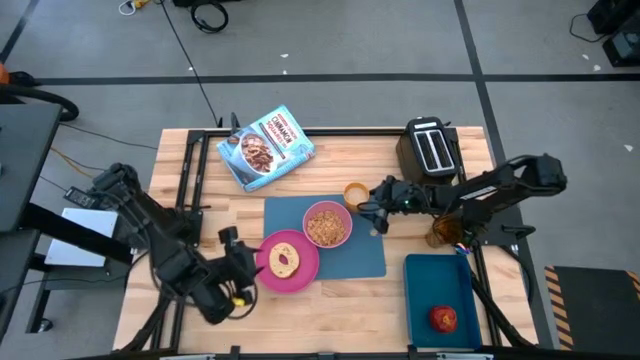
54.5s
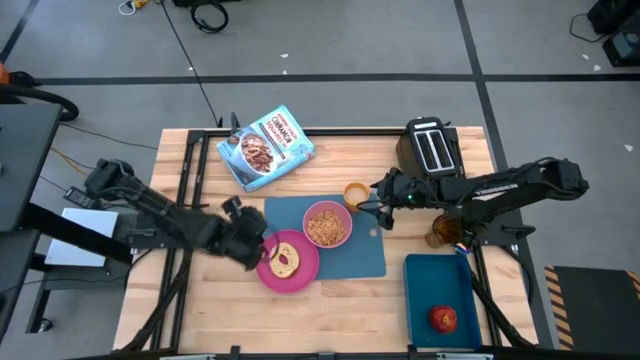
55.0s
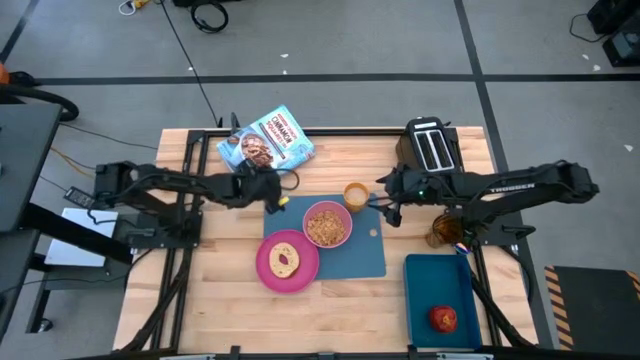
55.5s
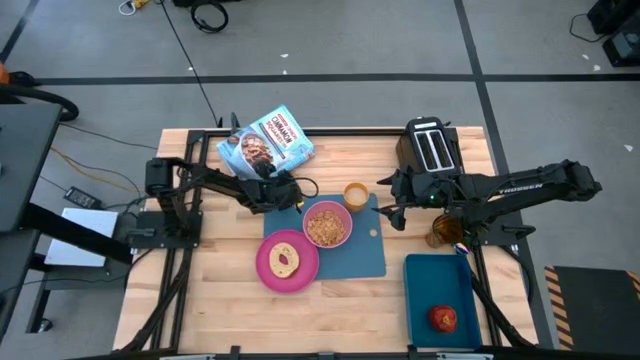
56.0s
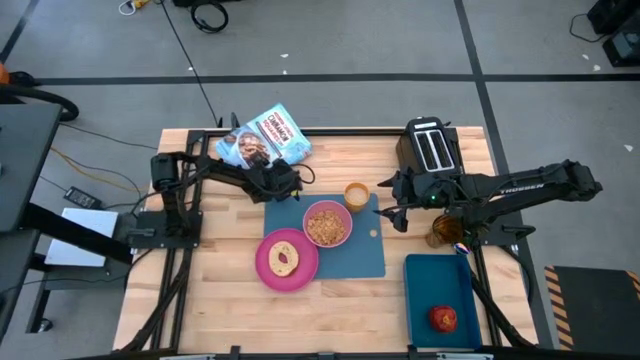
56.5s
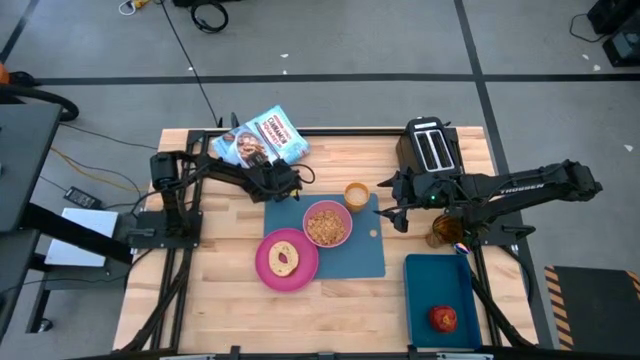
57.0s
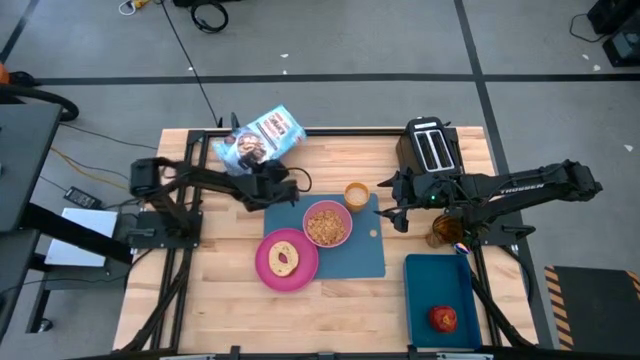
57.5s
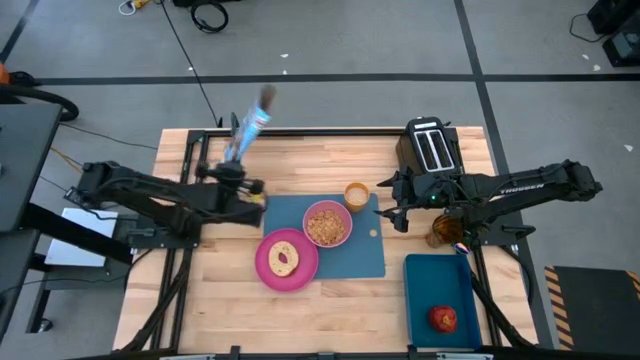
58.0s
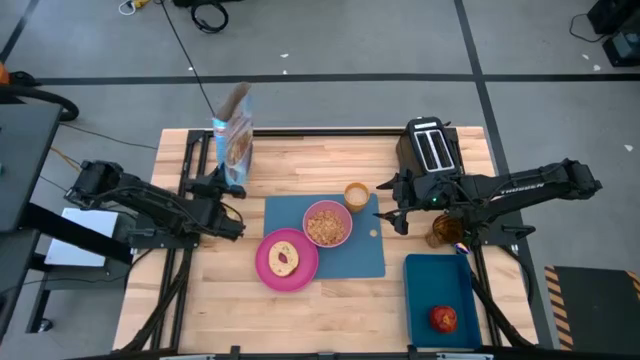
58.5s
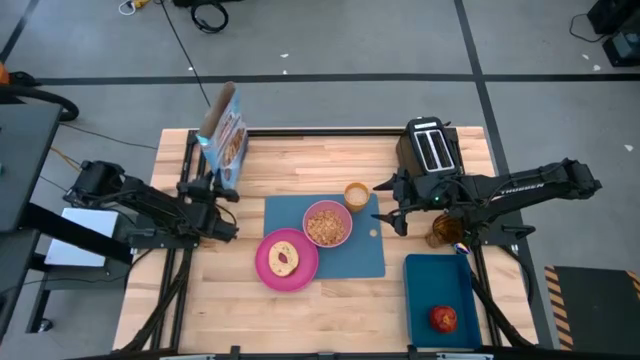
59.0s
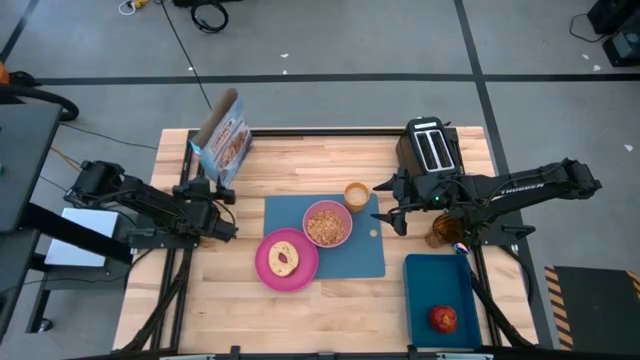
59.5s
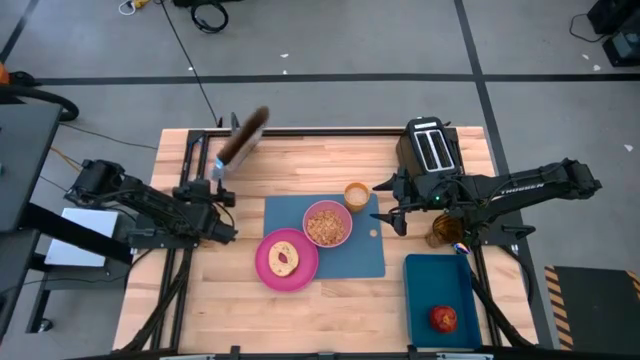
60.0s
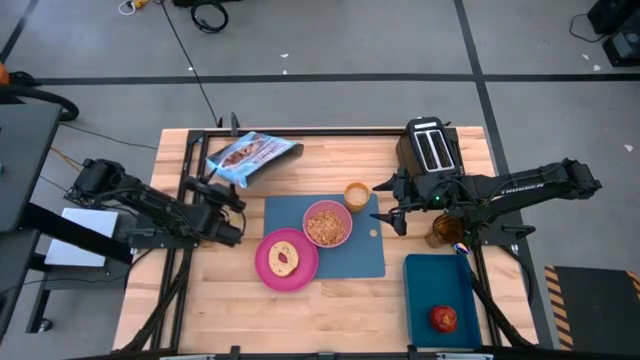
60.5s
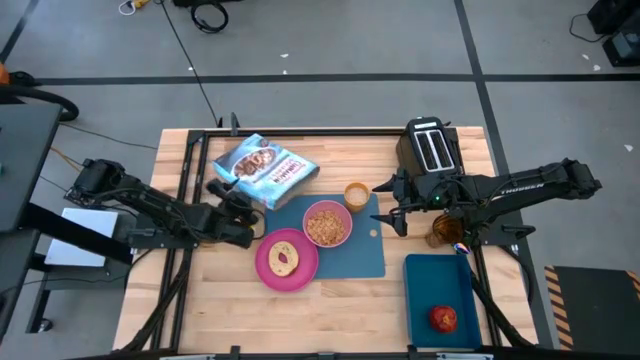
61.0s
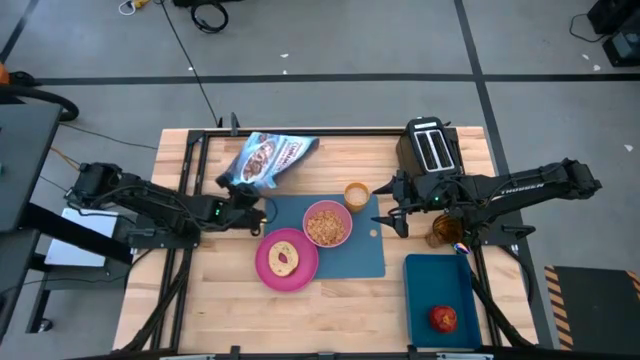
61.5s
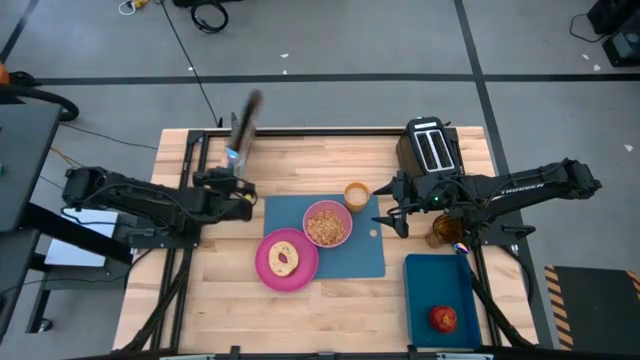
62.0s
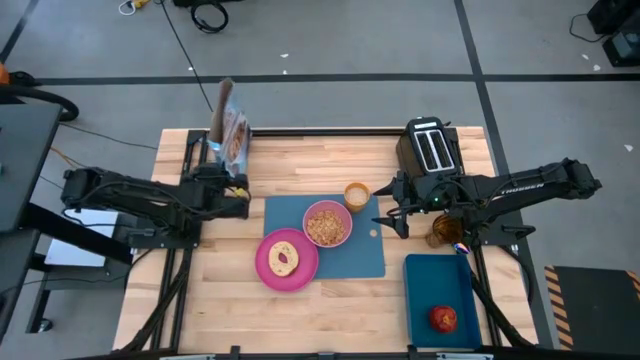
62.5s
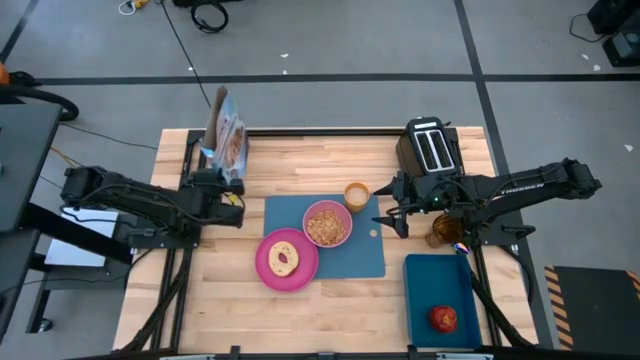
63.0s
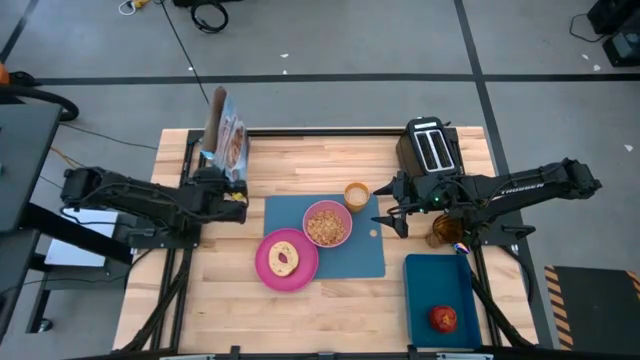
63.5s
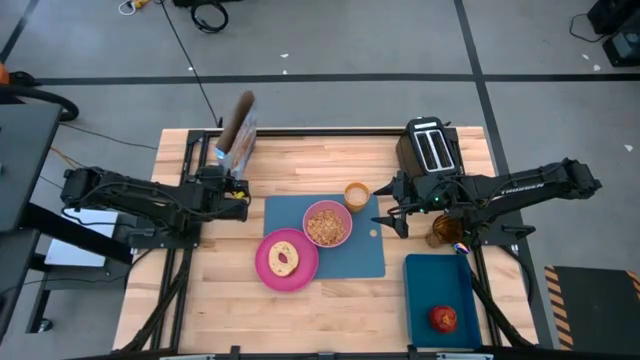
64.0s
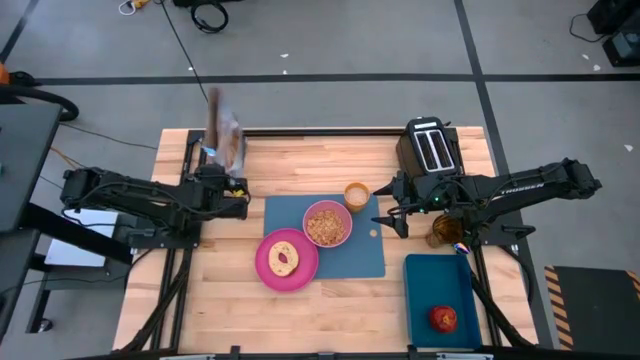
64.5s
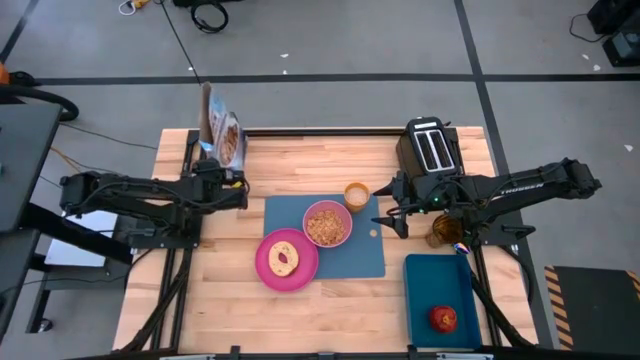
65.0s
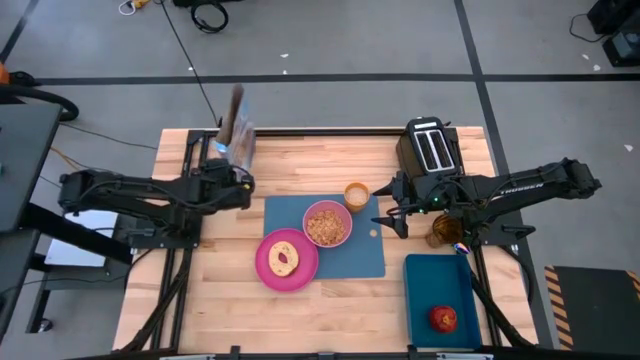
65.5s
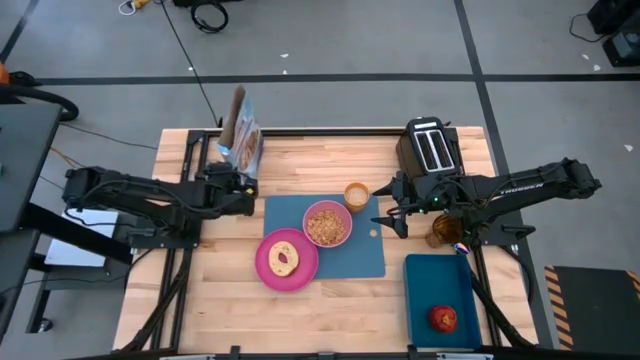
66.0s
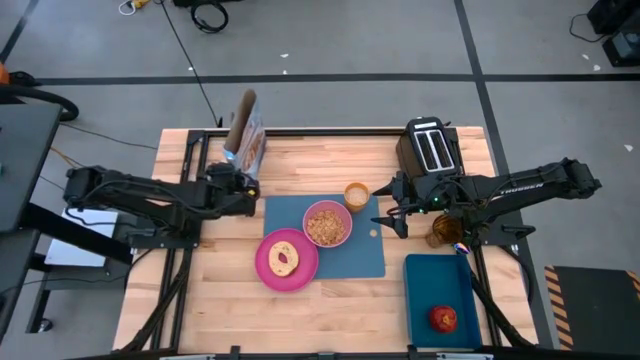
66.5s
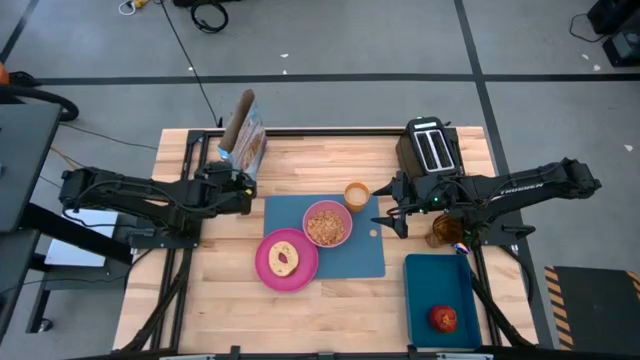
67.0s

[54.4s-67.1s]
Task: Arrange a breakfast setting
Put the blue cereal box on the table upright

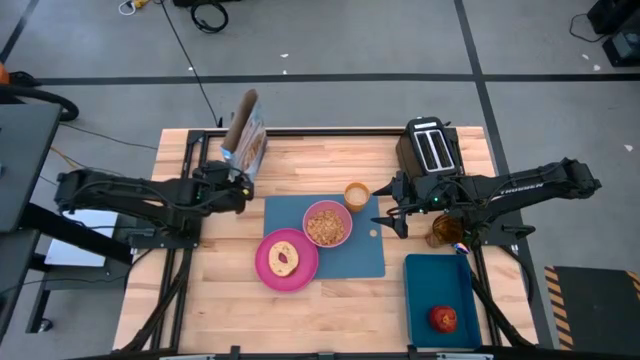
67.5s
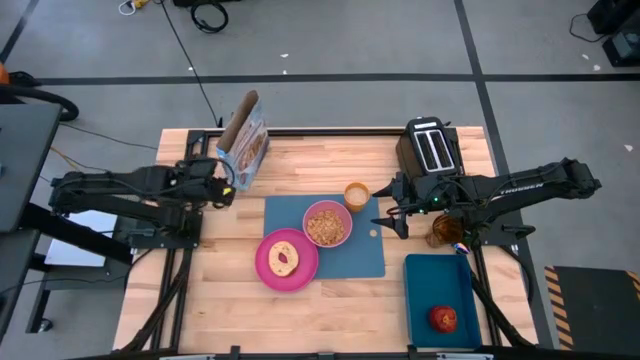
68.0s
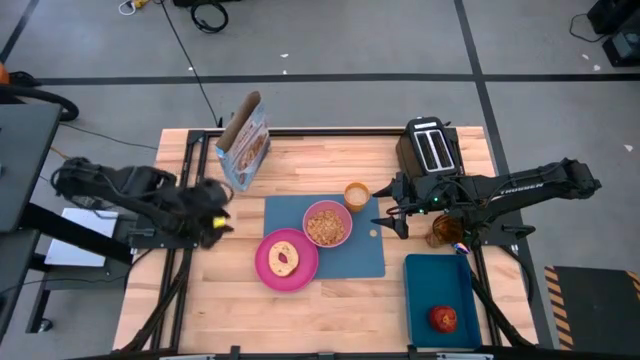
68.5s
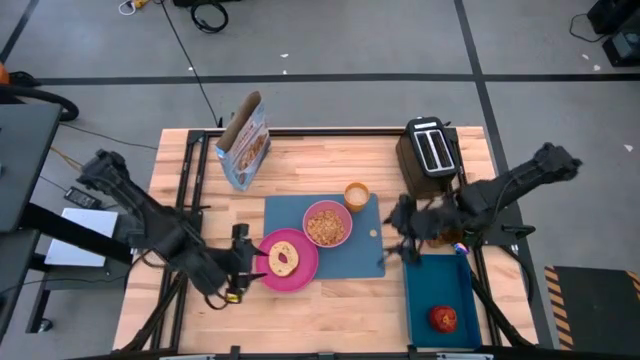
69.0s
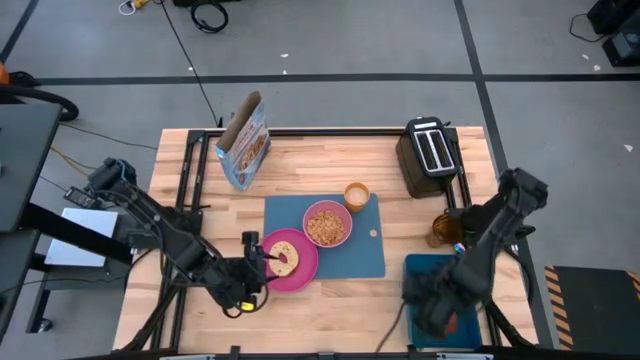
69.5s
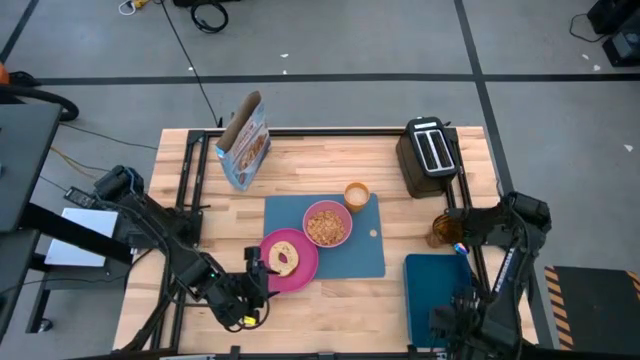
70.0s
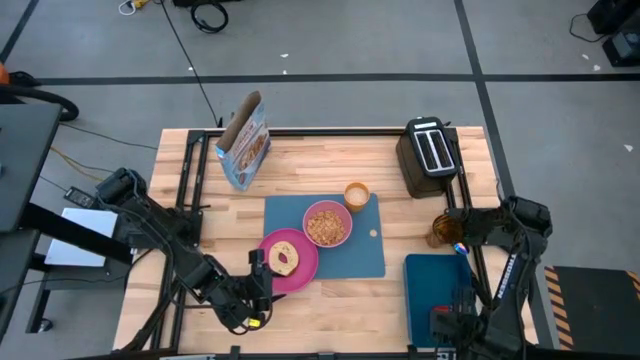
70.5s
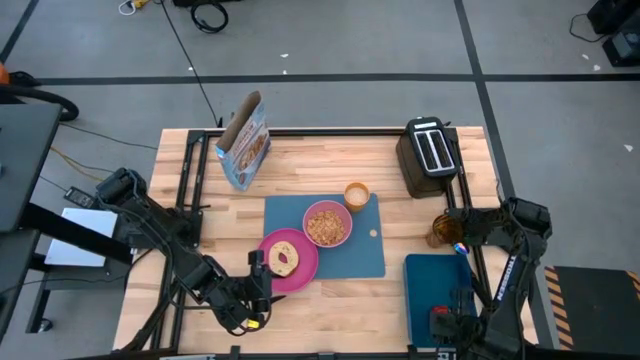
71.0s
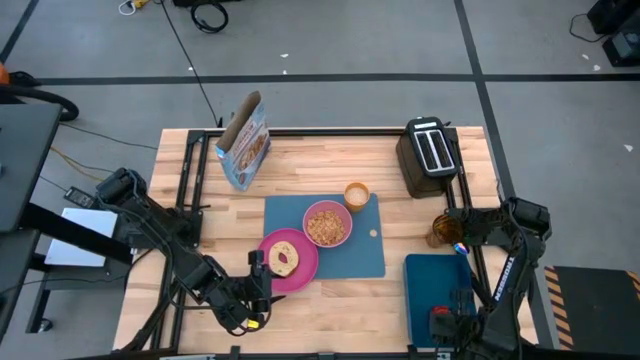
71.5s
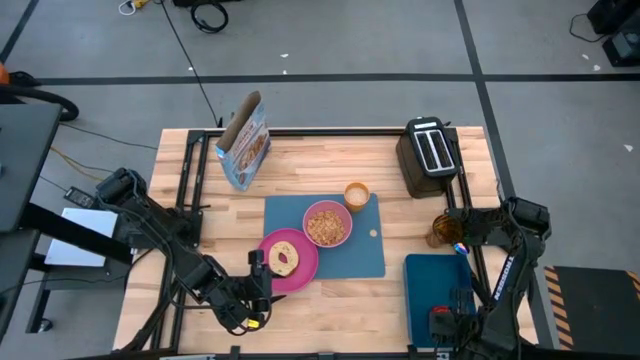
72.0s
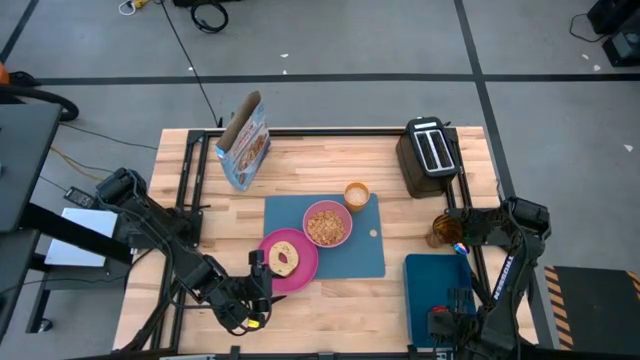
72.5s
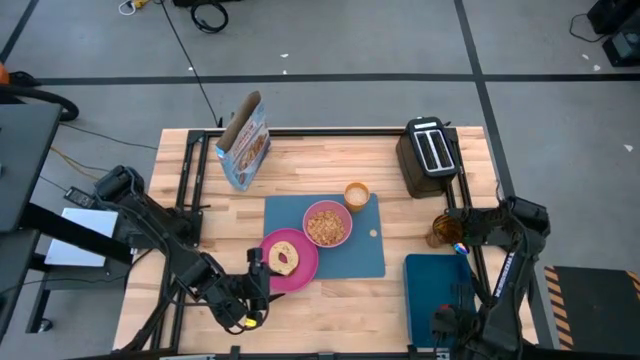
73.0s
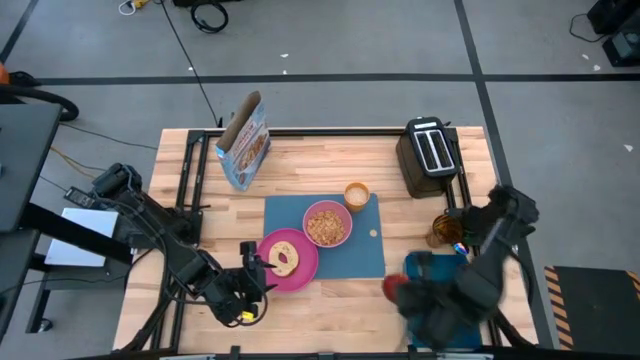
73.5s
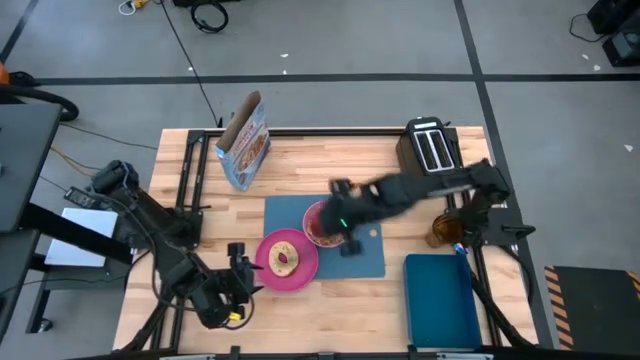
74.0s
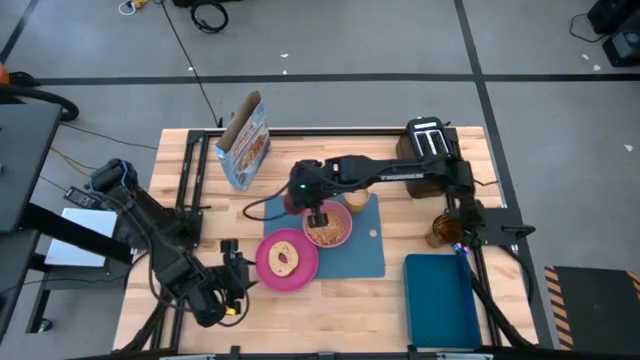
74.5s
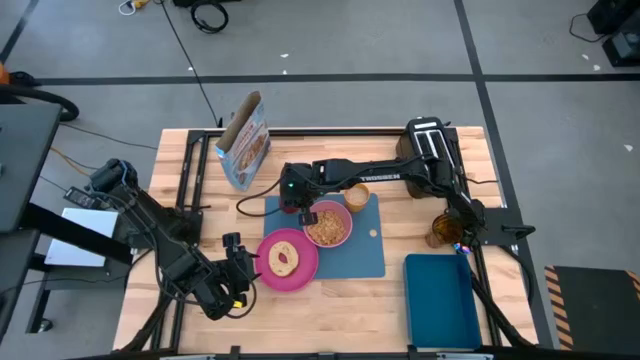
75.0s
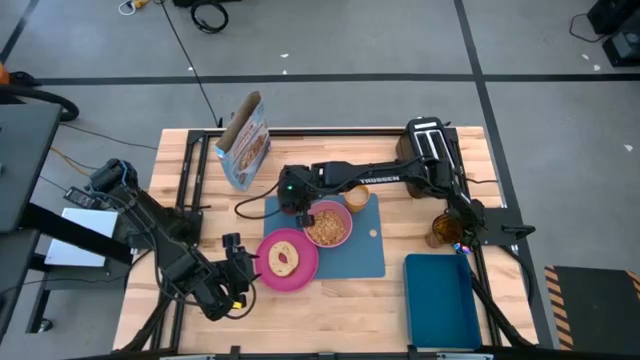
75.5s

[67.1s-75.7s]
Put the red apple on the blue placemat above the pink bowl
